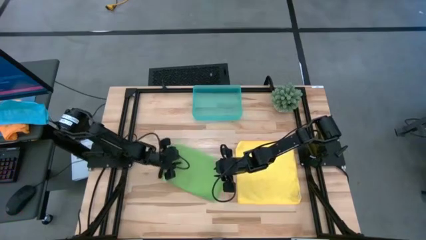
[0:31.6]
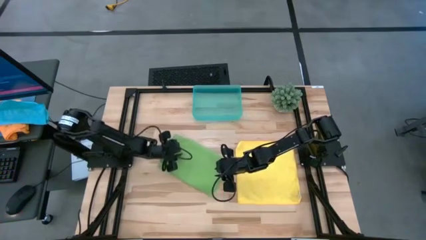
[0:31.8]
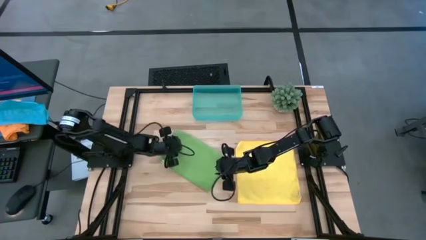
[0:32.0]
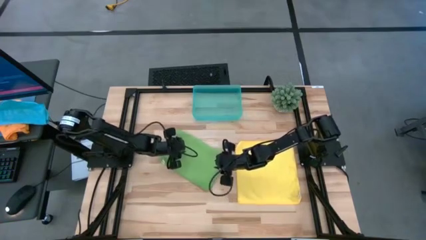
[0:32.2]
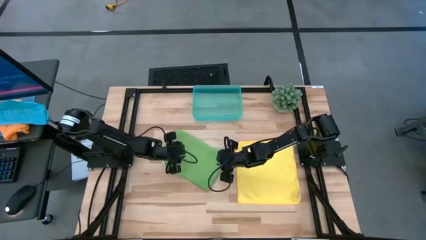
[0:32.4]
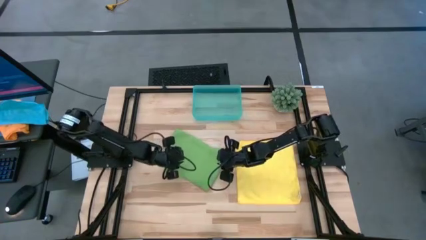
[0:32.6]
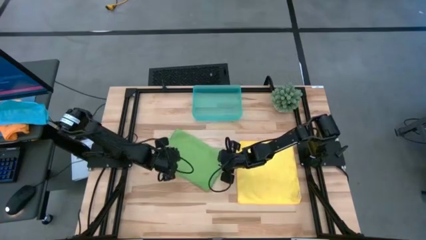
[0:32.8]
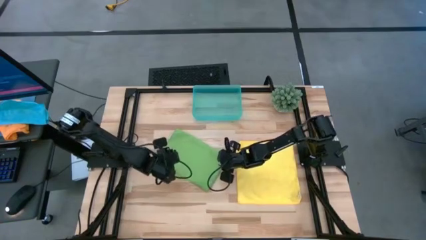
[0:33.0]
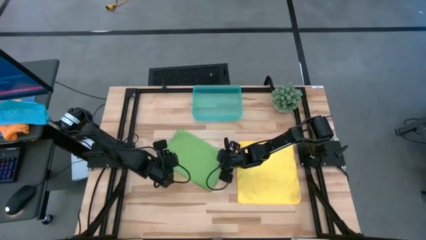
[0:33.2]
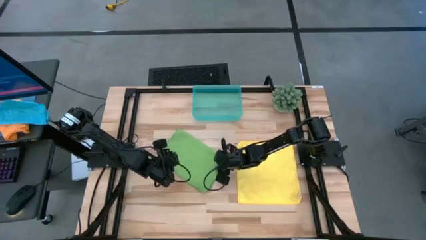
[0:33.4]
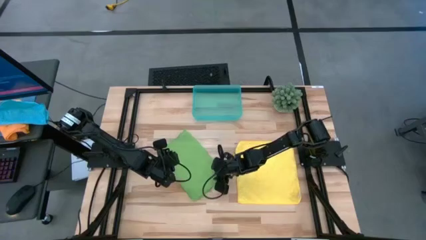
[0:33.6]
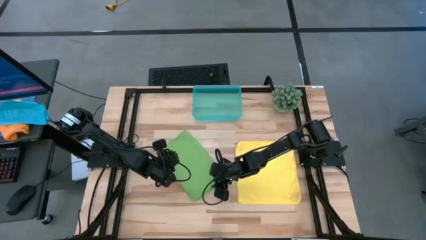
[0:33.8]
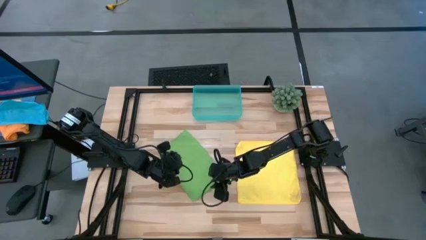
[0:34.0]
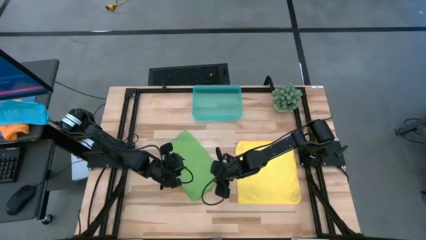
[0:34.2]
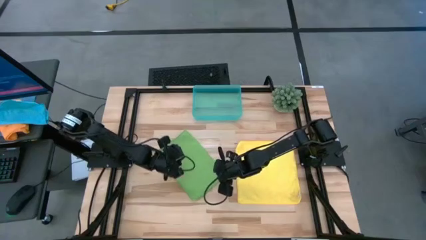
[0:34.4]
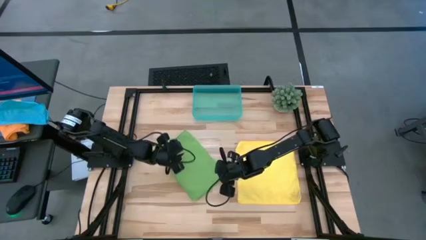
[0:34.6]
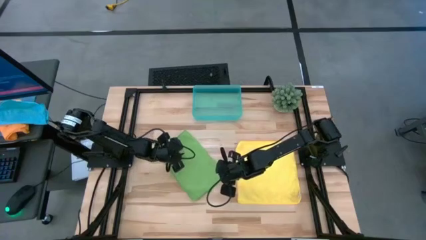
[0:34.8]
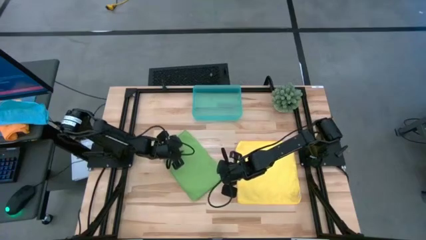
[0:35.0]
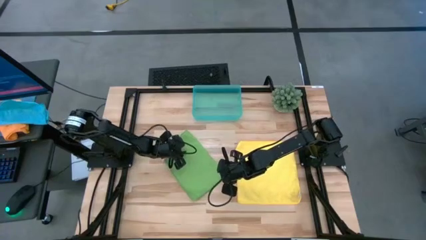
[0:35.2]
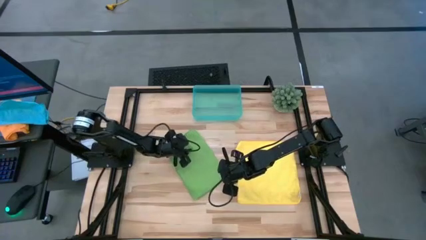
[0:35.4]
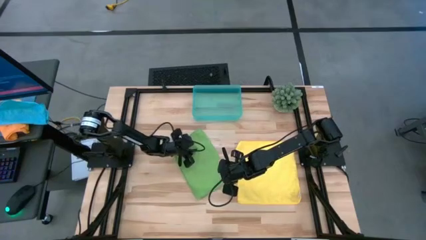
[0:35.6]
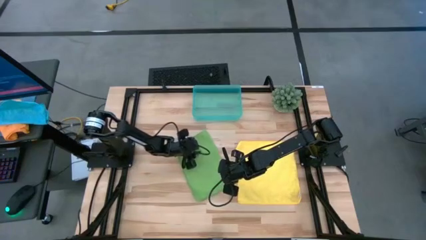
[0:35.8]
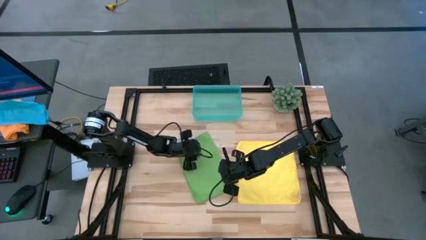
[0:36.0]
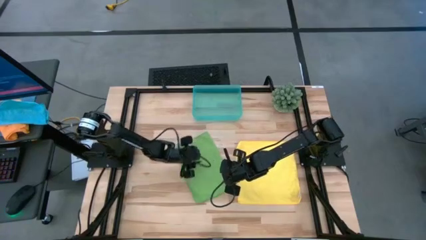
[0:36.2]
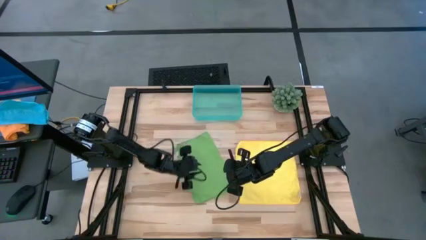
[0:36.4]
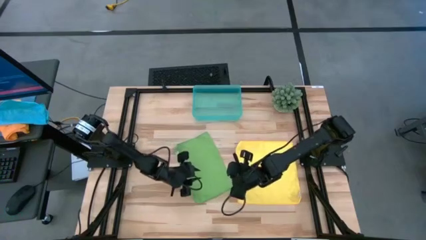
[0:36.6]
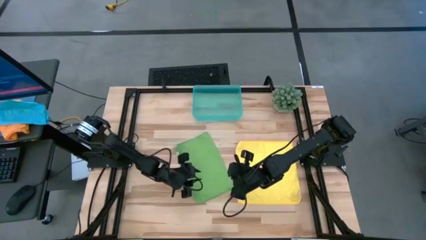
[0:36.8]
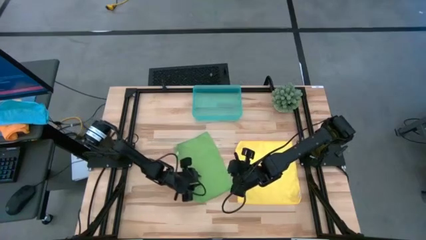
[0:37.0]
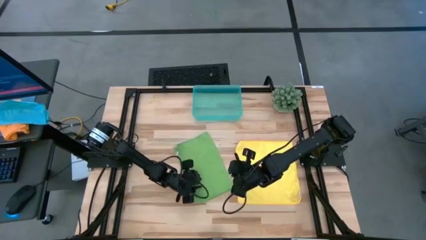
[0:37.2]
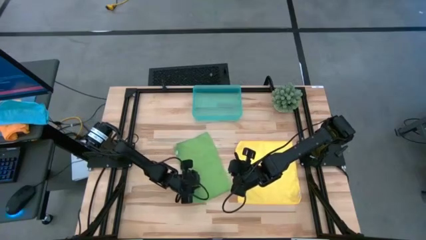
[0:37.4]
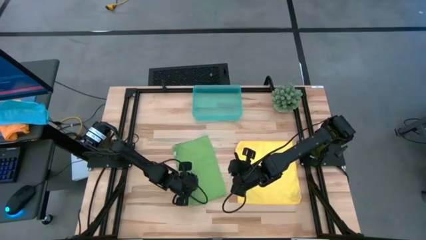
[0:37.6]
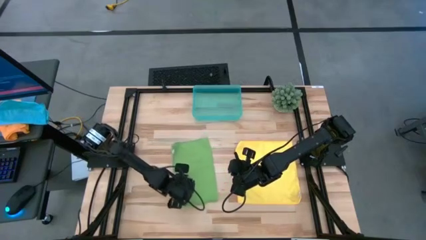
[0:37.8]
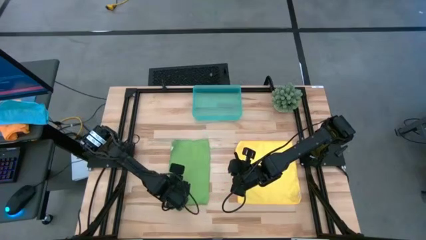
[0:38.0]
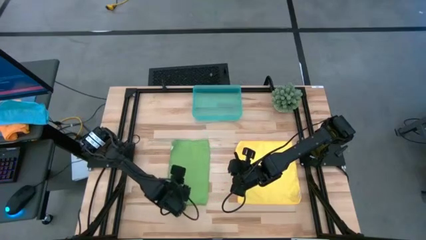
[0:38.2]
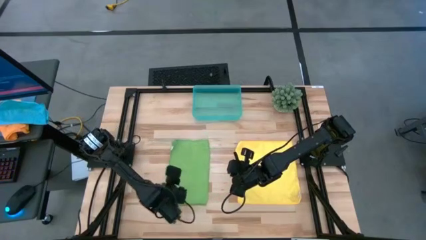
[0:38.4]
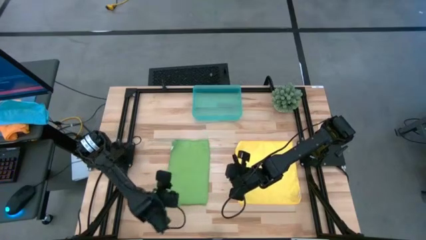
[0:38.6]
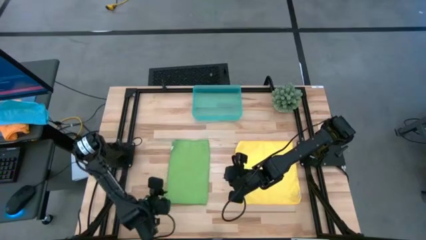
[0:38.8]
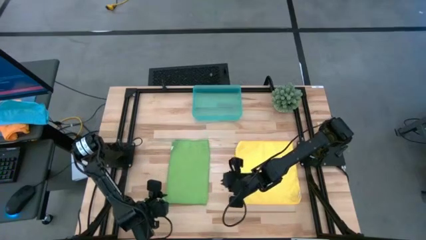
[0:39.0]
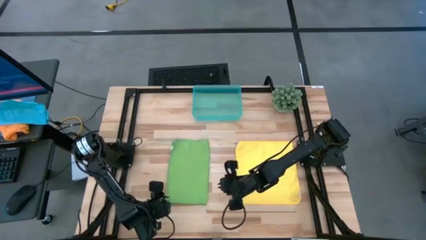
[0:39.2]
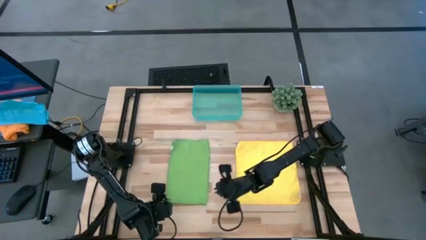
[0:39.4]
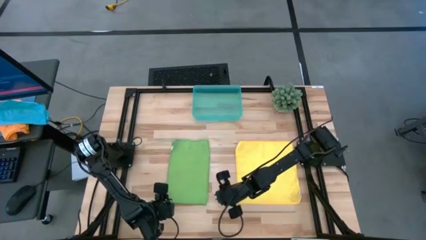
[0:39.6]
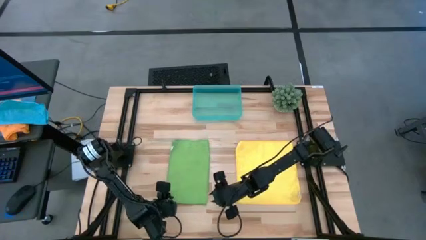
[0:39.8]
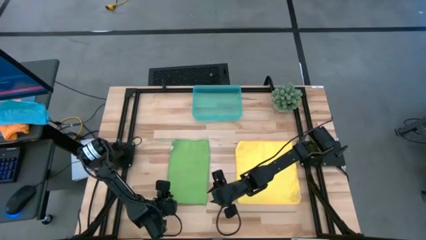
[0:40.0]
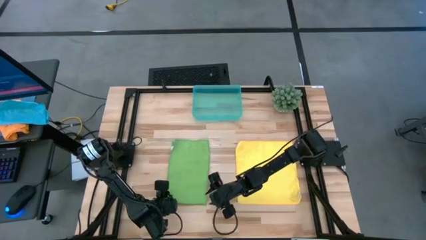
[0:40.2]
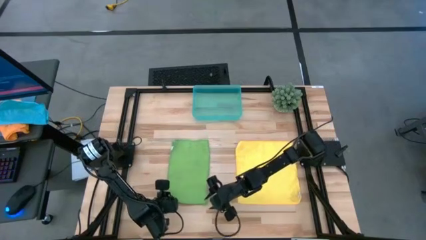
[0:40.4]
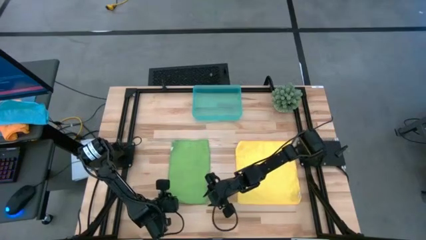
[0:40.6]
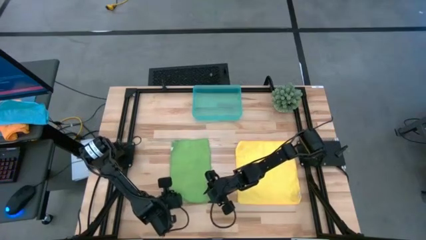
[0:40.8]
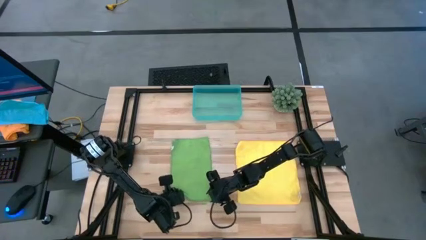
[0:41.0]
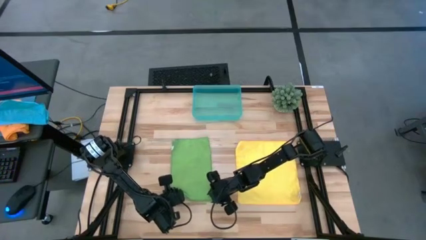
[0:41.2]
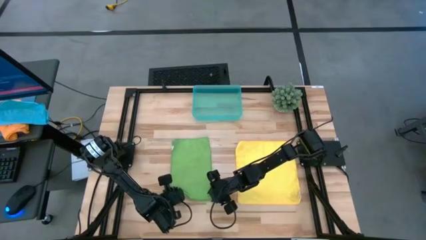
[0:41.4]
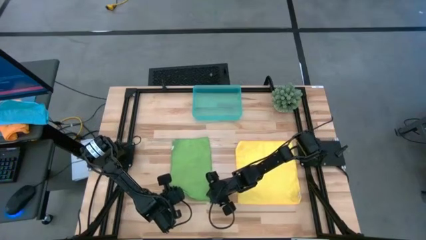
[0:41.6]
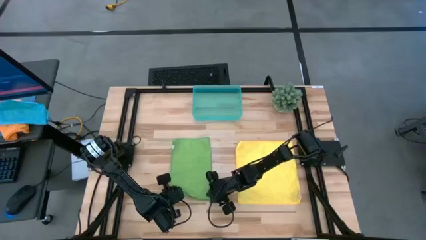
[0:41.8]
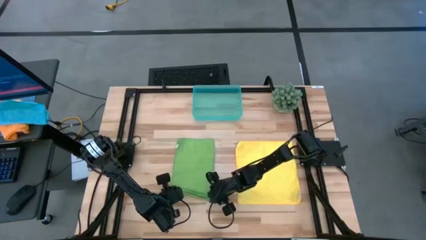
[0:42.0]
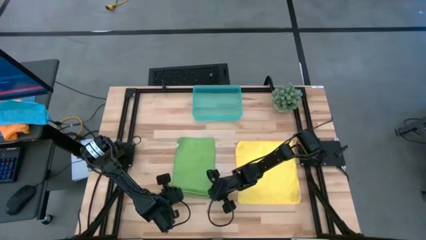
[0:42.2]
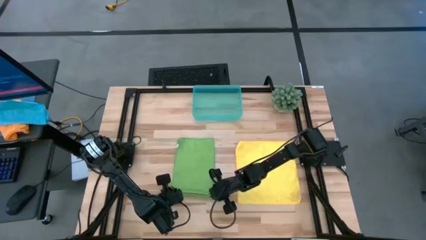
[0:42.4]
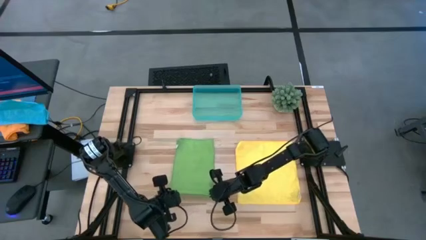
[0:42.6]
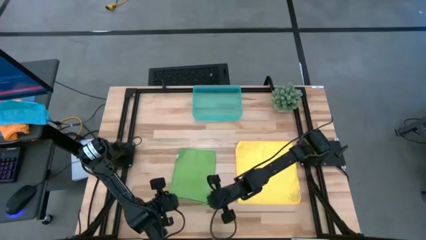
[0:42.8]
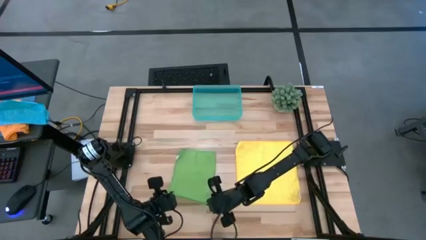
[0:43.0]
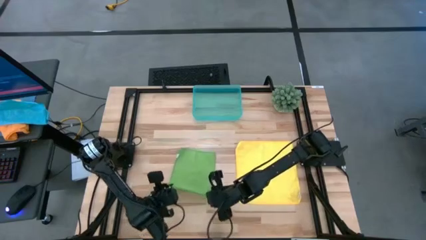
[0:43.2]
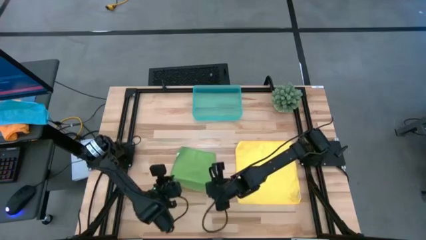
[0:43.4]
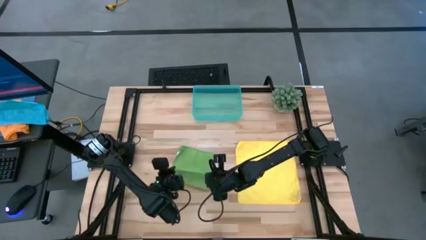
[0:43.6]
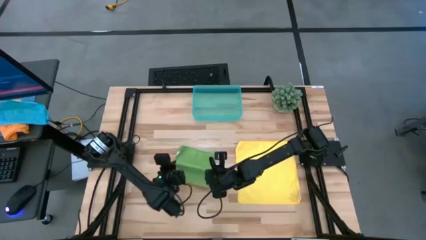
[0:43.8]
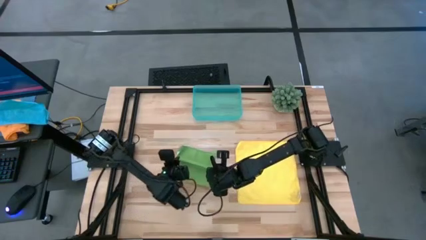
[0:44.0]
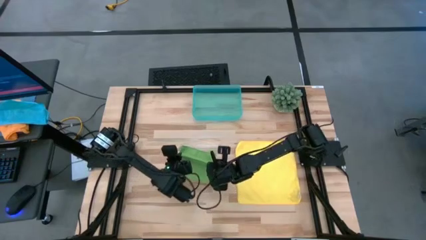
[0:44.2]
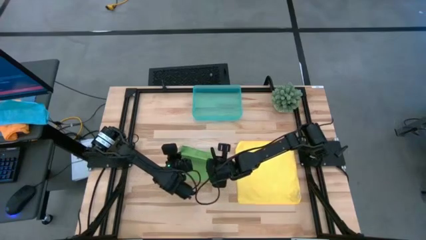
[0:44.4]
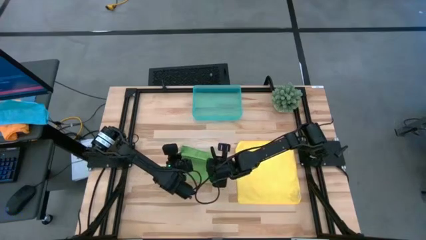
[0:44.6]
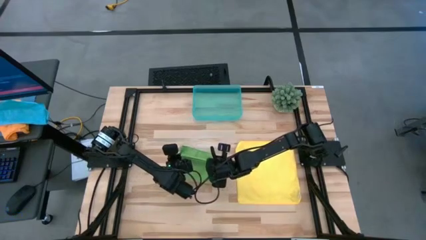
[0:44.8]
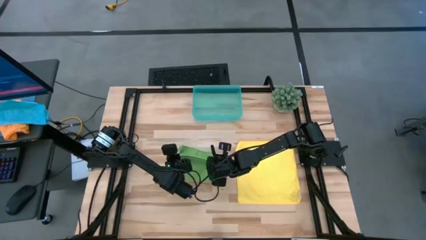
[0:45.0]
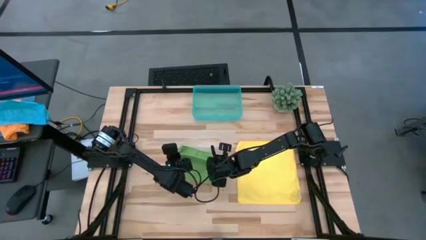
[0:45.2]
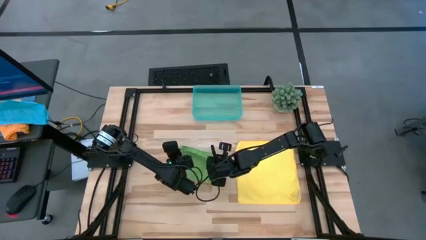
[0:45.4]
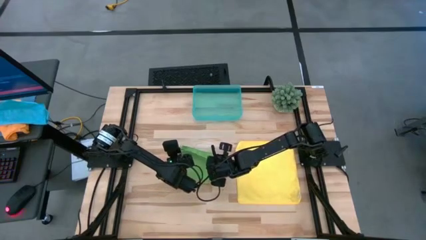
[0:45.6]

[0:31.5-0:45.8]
Task: Roll microfiber towels into tight, uniform cylinder then place into a basket
Fold the green towel
